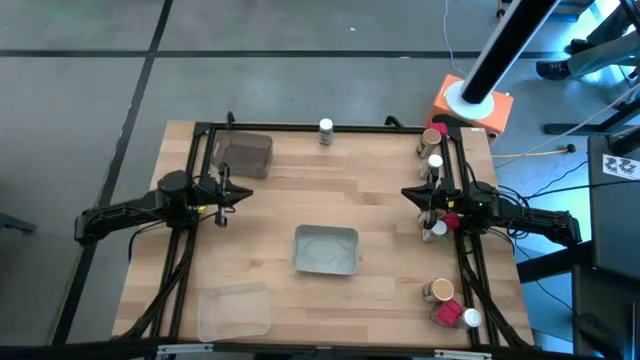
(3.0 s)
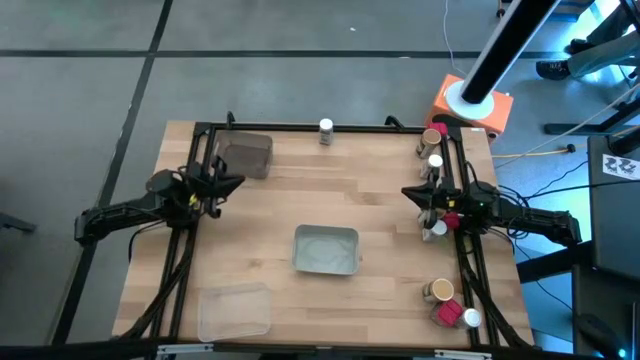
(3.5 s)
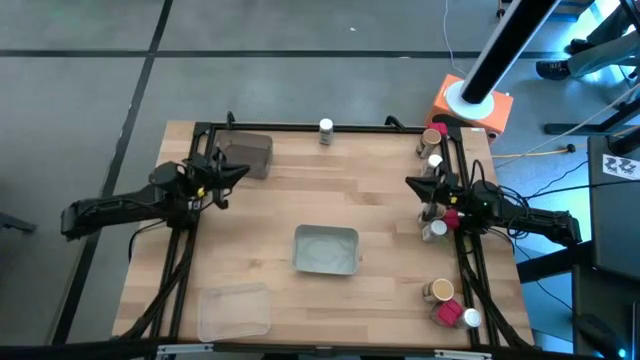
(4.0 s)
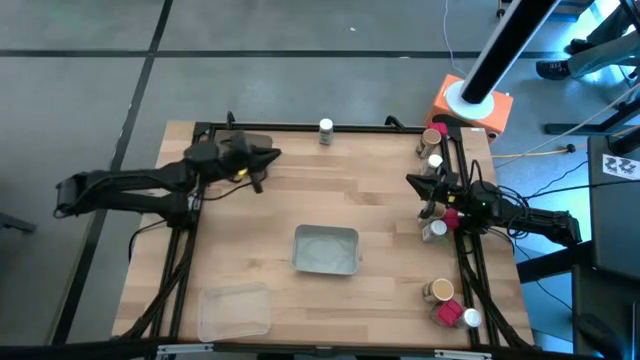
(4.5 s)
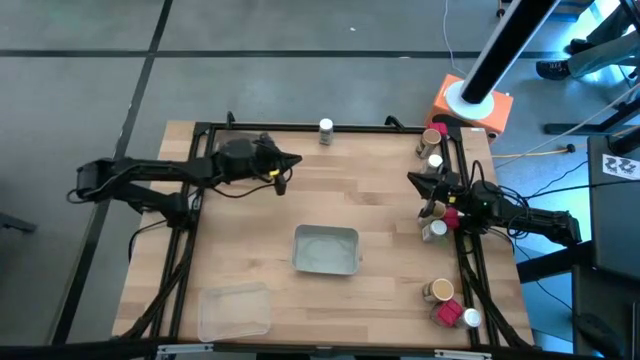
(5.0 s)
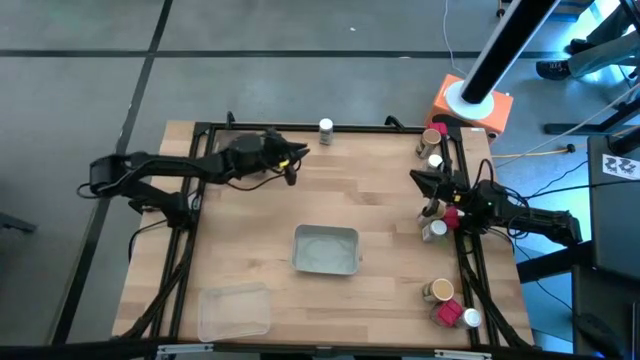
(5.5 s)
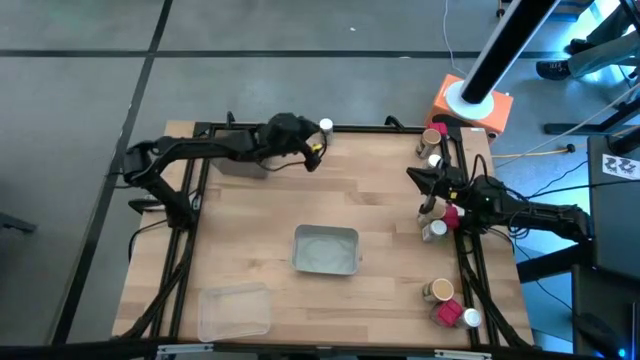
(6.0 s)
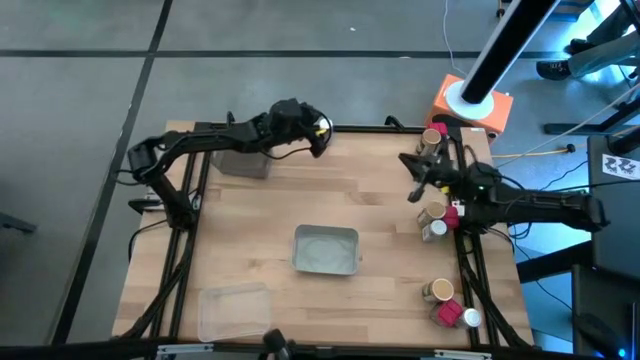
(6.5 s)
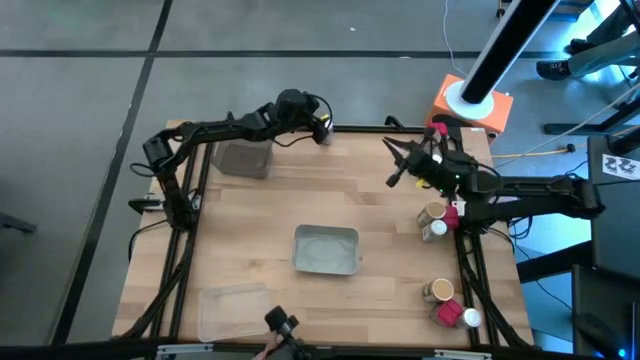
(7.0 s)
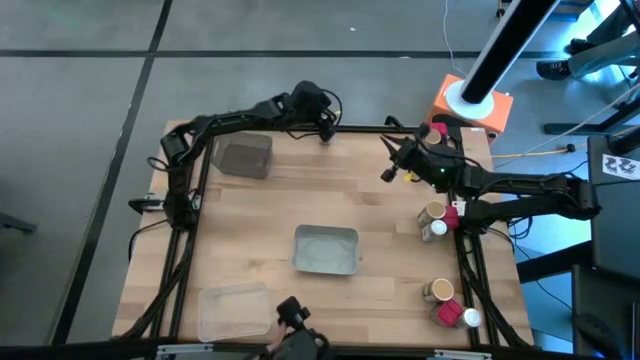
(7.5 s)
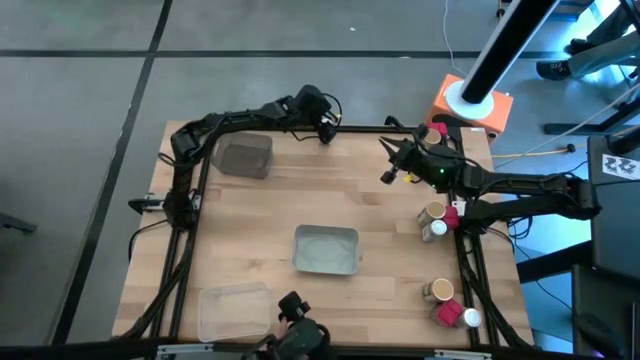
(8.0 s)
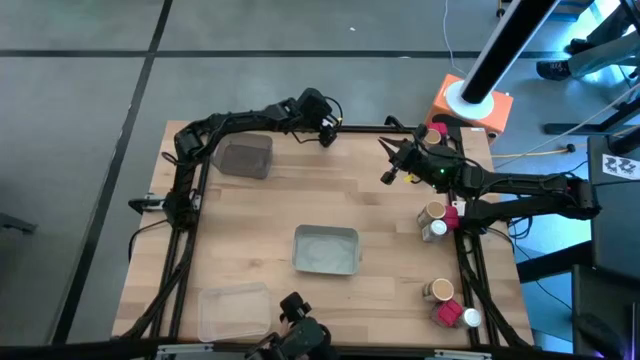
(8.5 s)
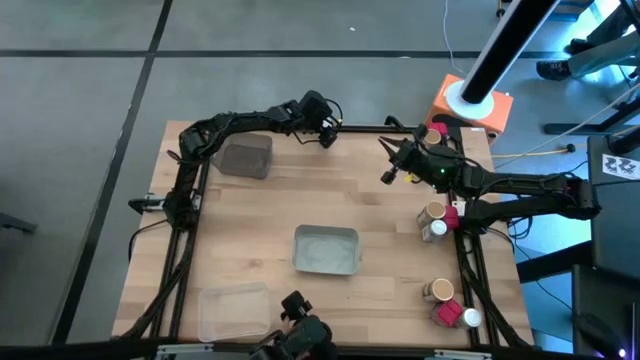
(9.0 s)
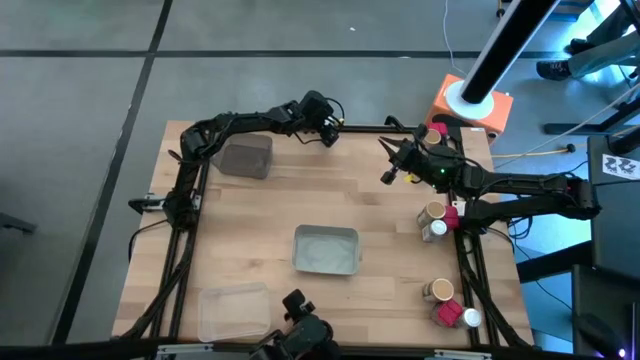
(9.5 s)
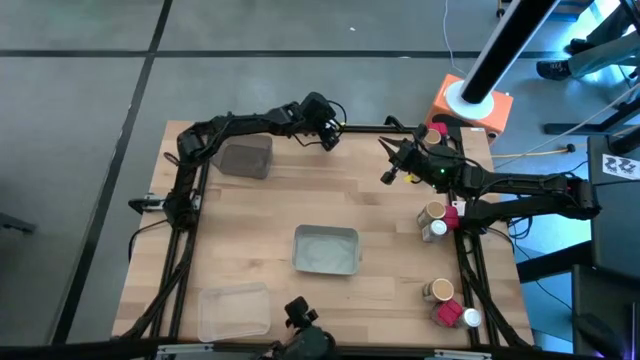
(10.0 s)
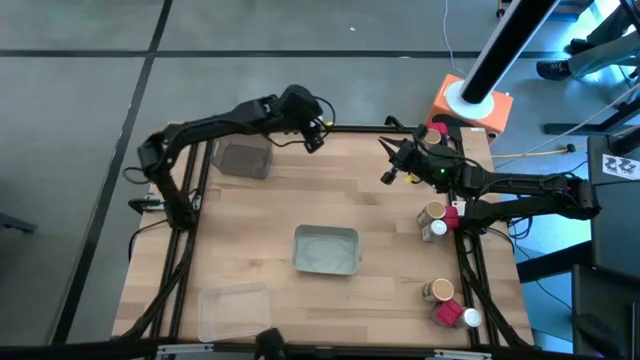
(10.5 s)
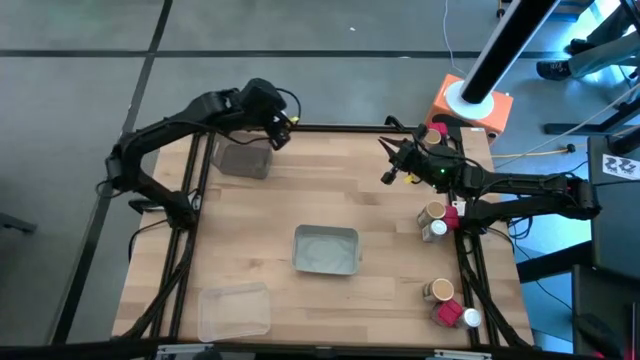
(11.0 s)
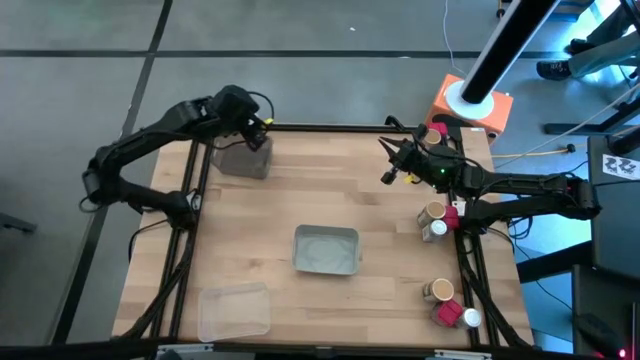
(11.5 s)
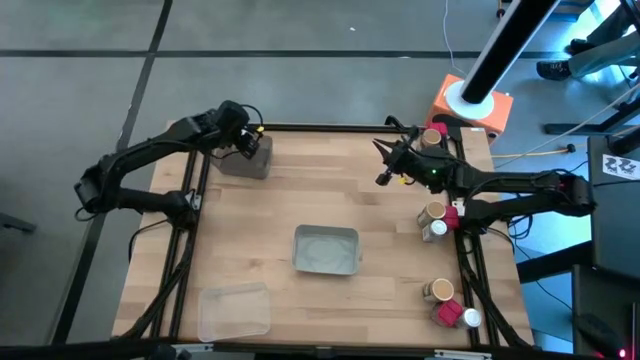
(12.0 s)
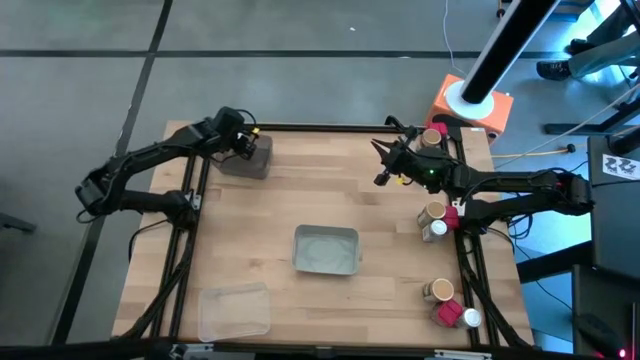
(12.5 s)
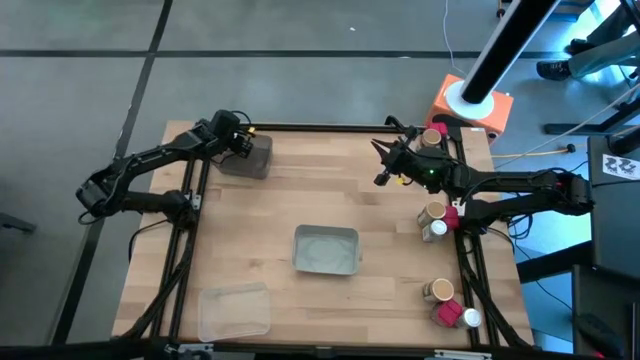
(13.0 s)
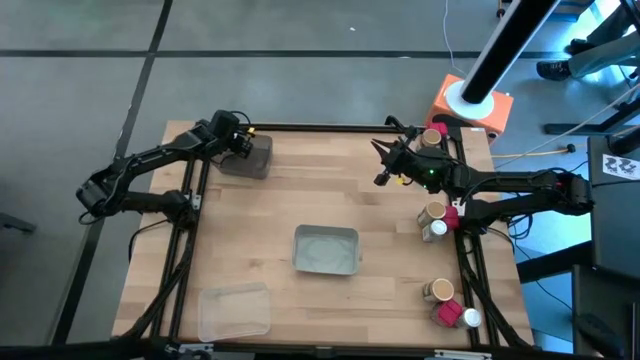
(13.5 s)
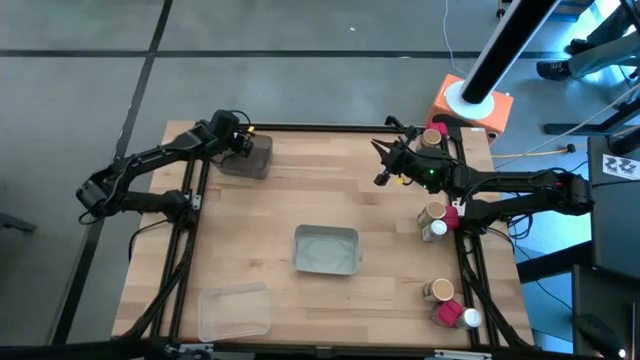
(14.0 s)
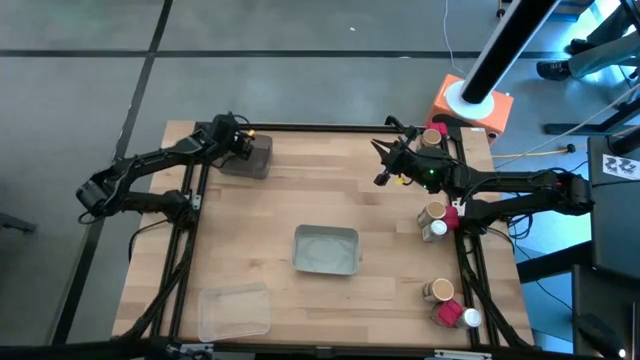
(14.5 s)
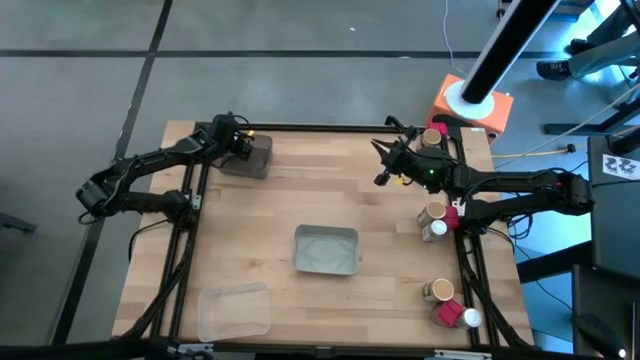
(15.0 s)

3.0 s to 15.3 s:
Task: Sort spices by type
Put the top left white seasoning bottle into the black bin

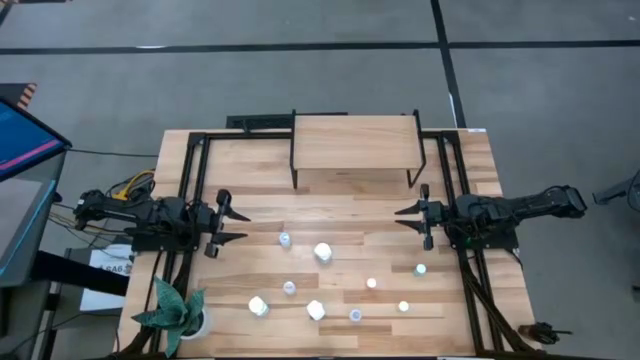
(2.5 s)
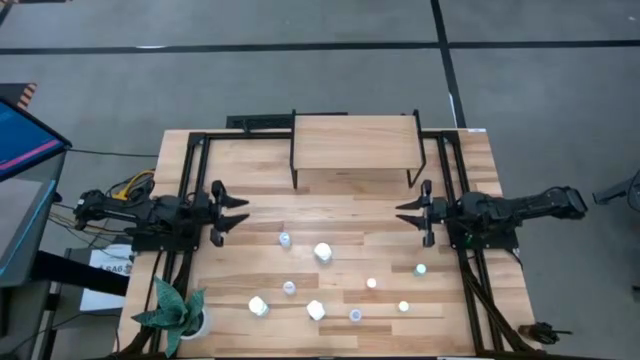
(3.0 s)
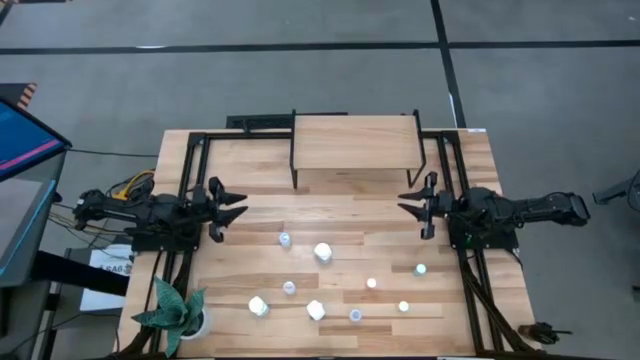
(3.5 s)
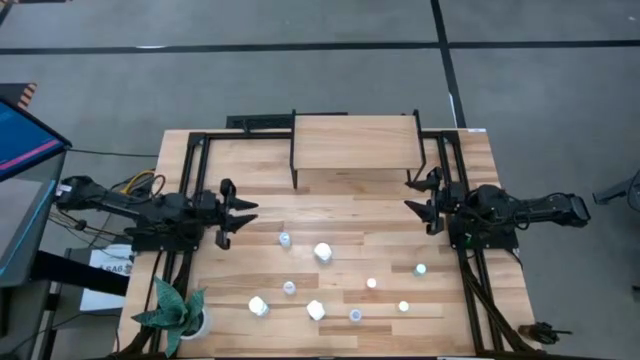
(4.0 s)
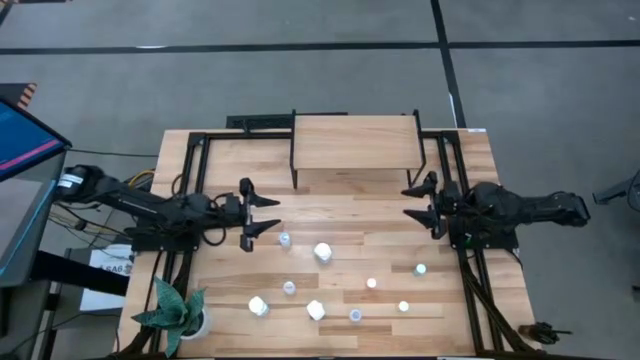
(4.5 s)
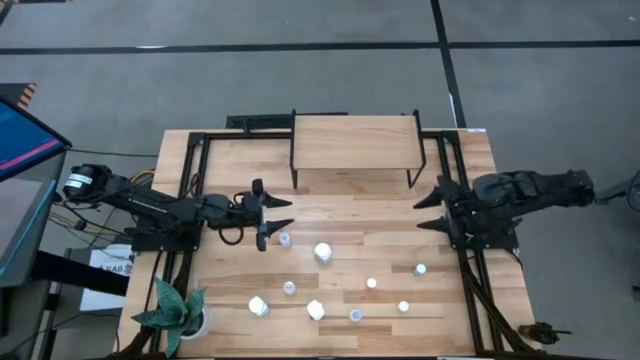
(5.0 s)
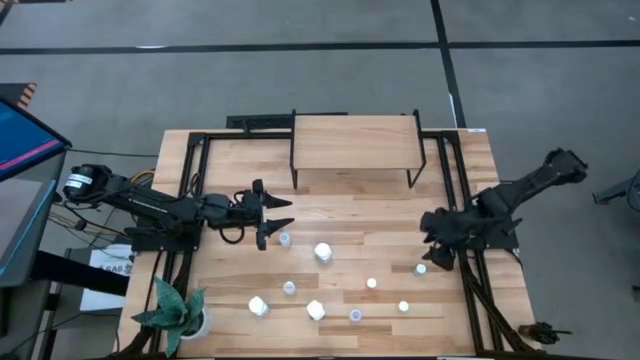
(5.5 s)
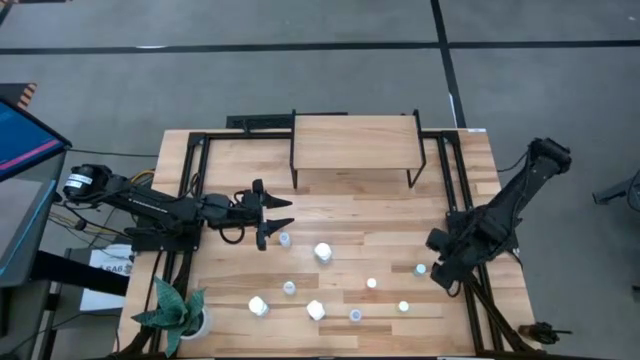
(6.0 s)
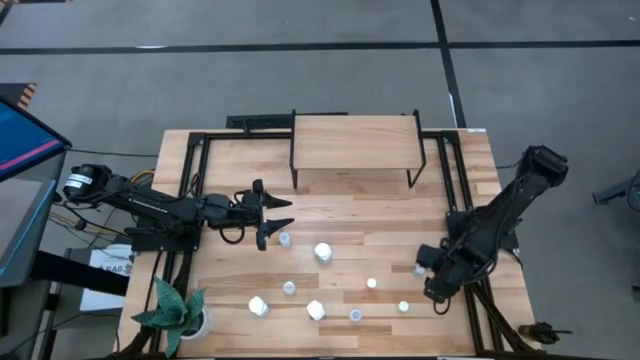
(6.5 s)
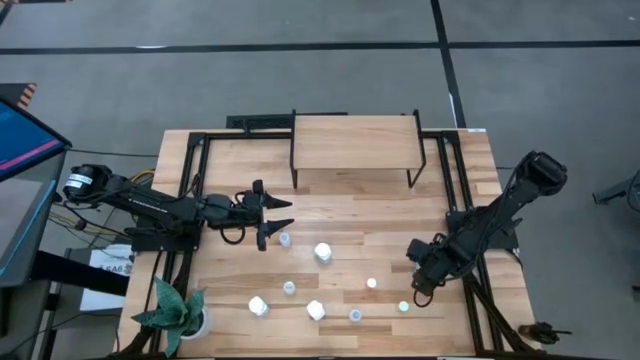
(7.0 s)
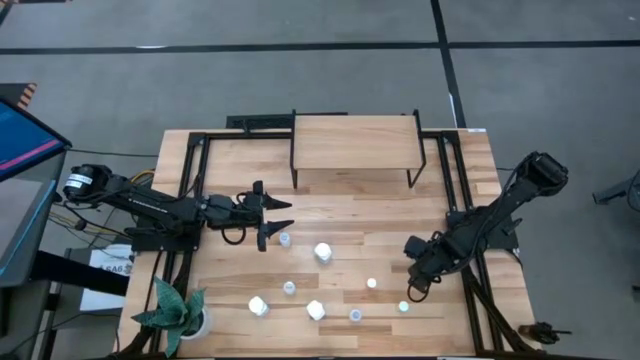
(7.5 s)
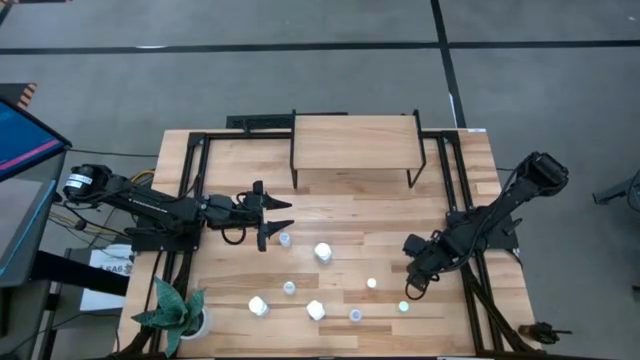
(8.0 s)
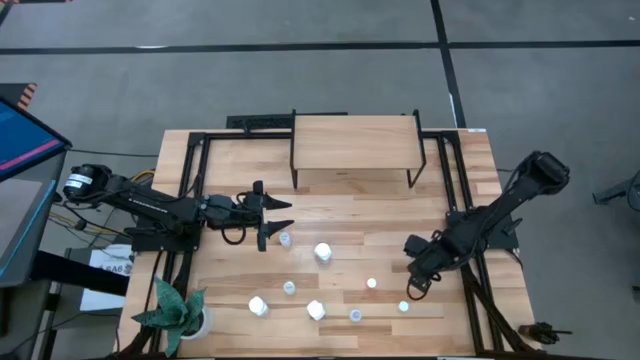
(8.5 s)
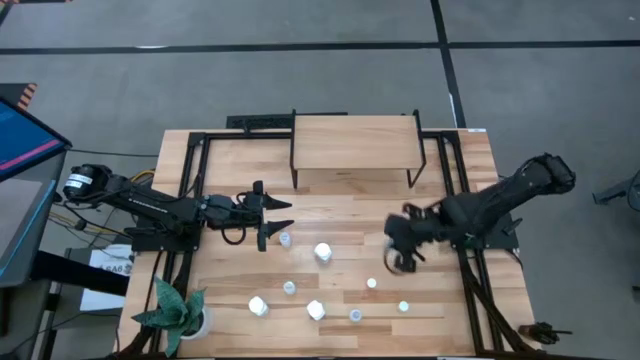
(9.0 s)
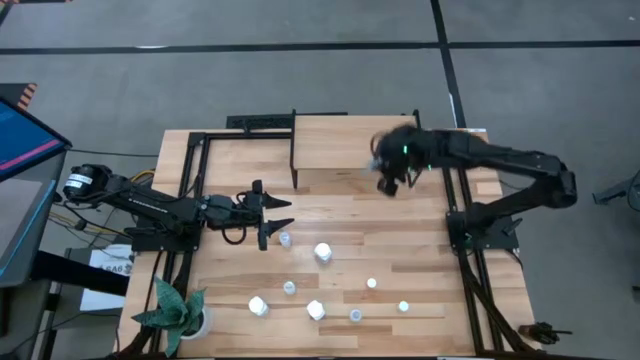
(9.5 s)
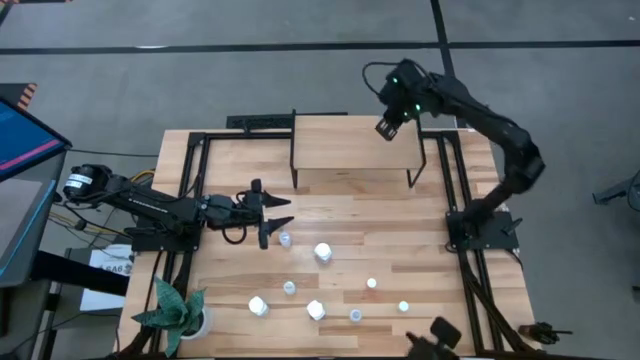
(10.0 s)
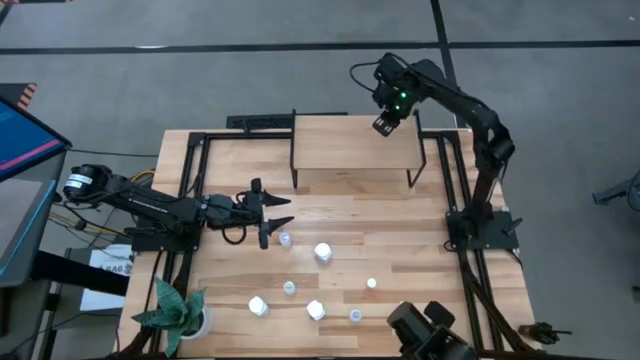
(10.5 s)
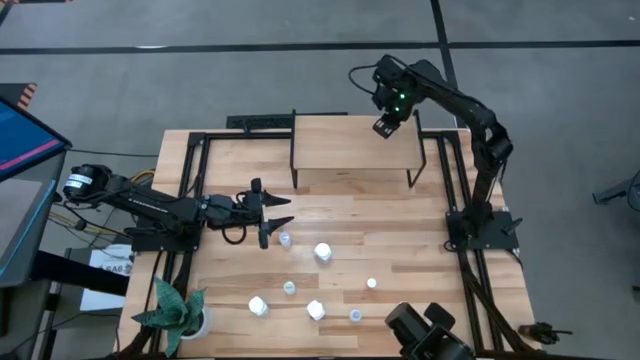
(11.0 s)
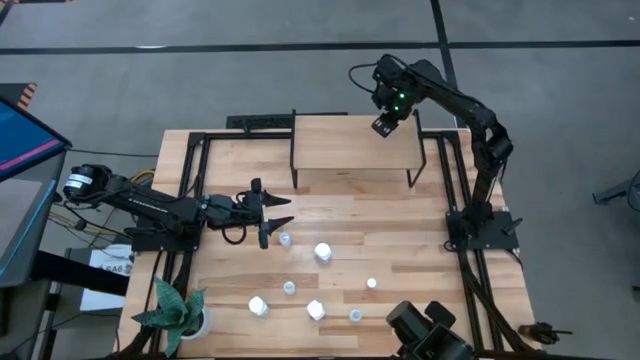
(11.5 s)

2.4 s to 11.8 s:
Task: Pick and place medicine bottles onto shelf by color
Put the blue pill bottle on the shelf
